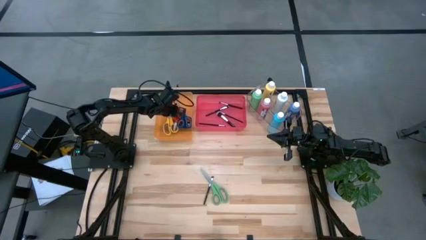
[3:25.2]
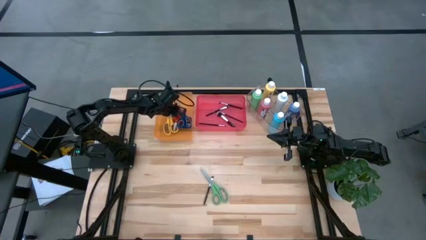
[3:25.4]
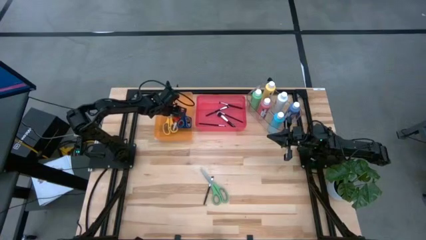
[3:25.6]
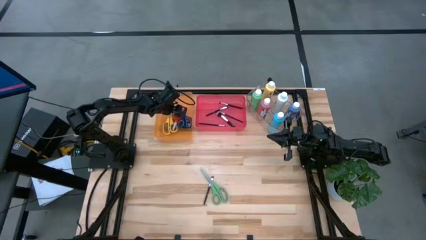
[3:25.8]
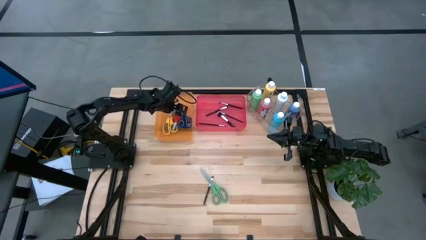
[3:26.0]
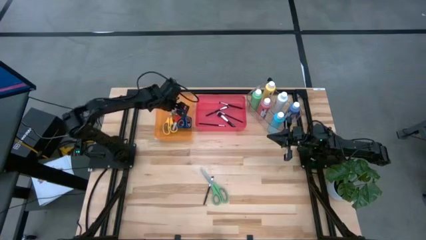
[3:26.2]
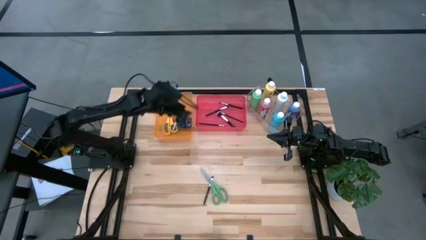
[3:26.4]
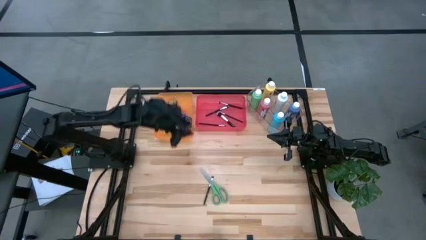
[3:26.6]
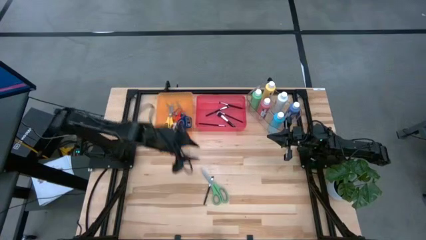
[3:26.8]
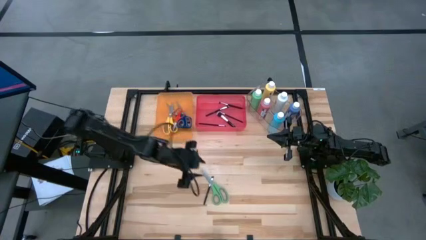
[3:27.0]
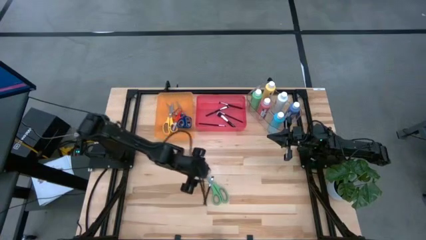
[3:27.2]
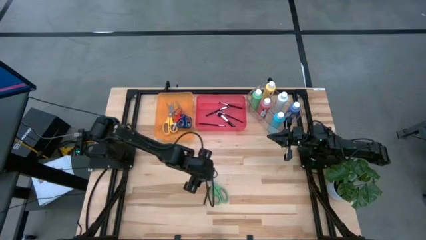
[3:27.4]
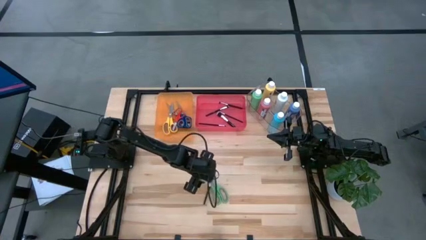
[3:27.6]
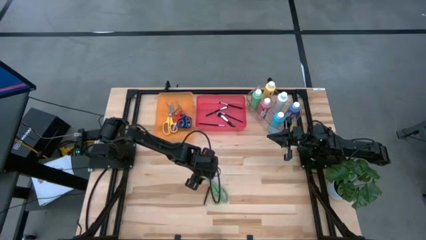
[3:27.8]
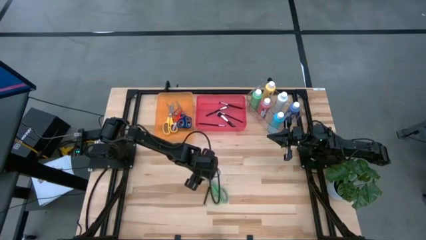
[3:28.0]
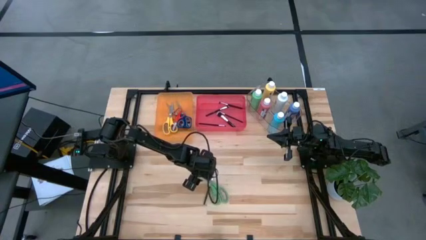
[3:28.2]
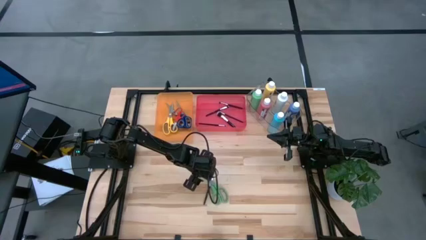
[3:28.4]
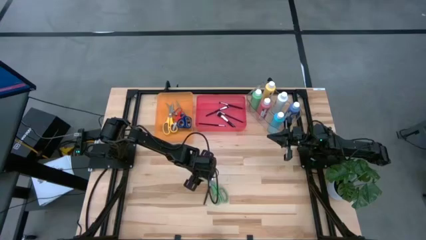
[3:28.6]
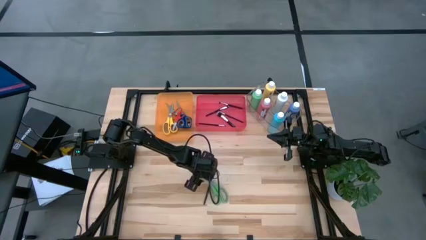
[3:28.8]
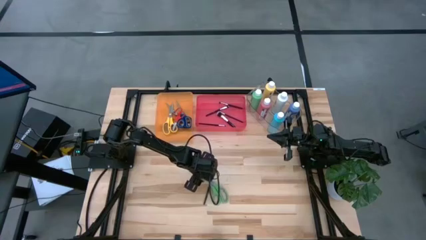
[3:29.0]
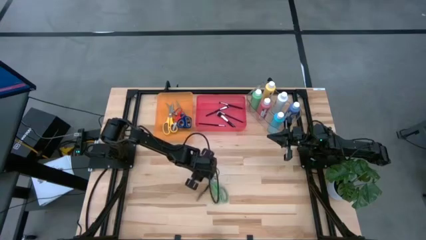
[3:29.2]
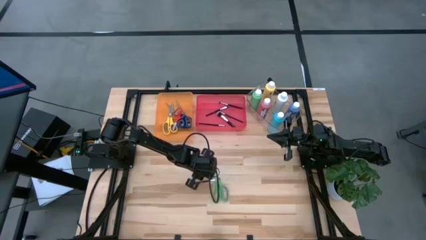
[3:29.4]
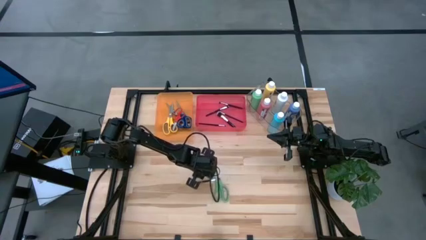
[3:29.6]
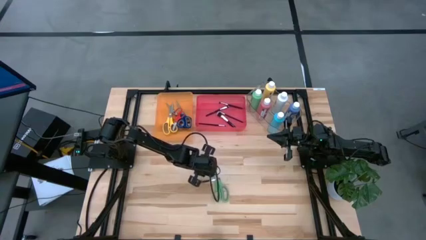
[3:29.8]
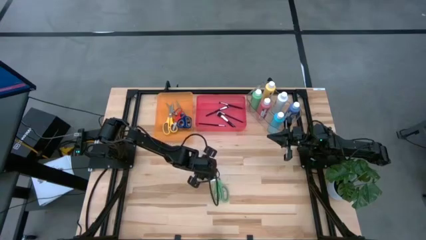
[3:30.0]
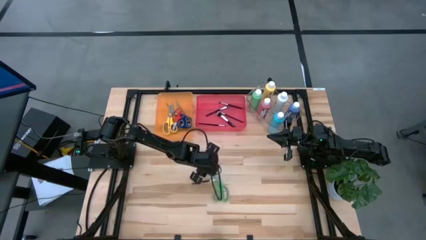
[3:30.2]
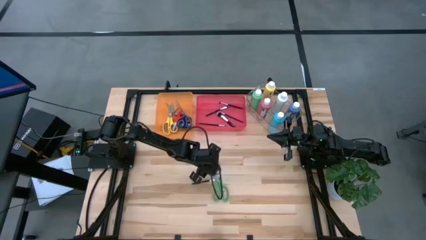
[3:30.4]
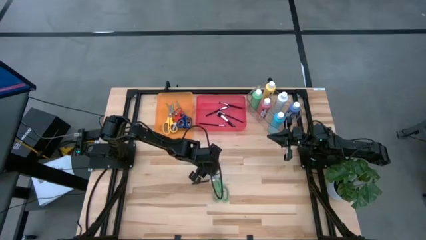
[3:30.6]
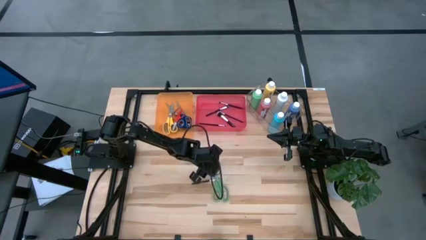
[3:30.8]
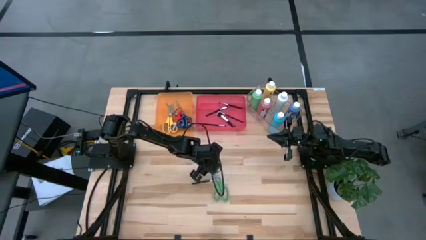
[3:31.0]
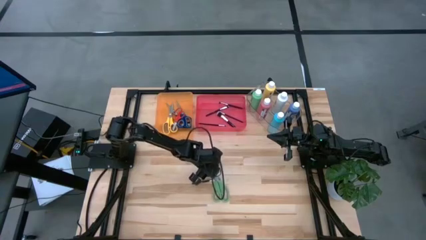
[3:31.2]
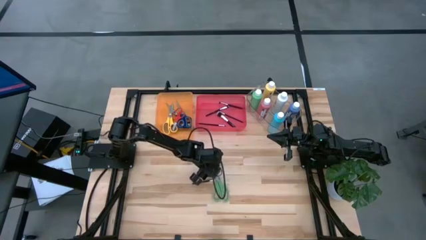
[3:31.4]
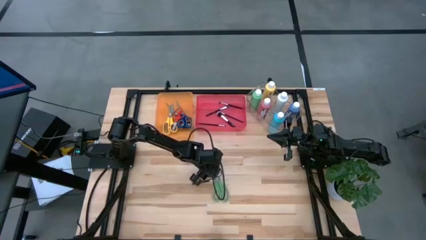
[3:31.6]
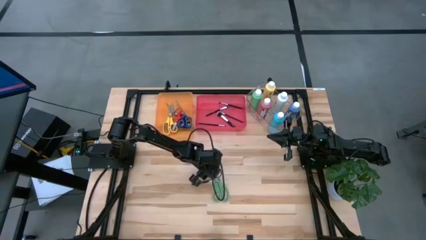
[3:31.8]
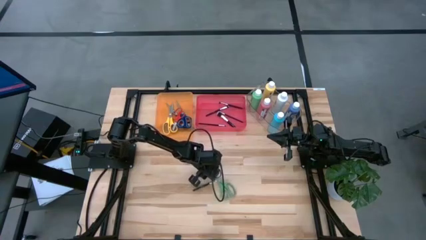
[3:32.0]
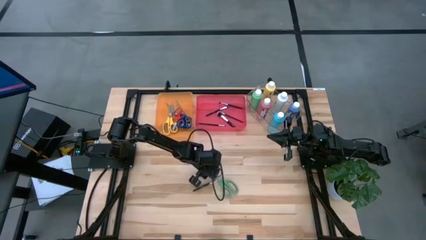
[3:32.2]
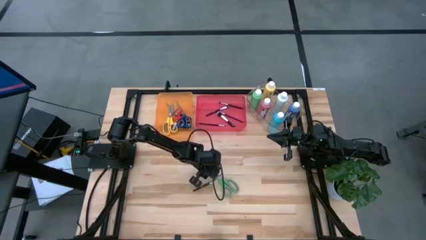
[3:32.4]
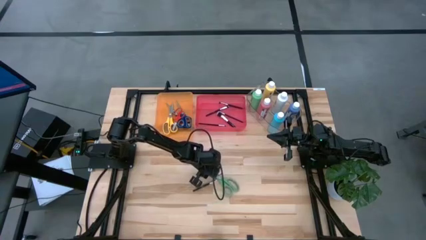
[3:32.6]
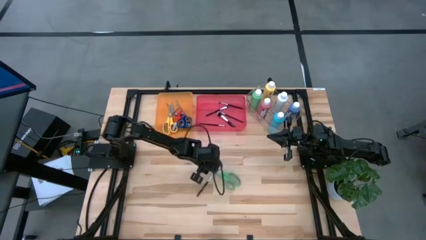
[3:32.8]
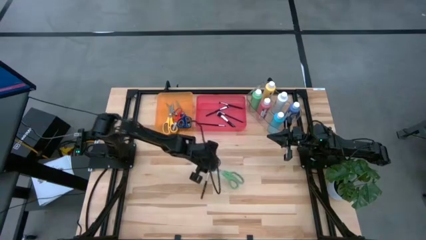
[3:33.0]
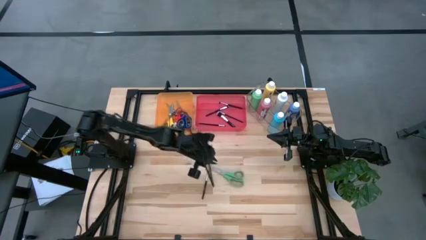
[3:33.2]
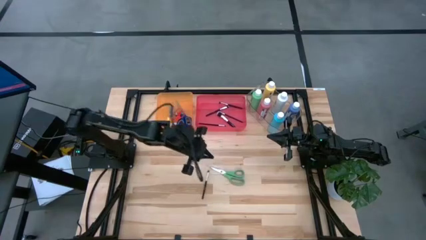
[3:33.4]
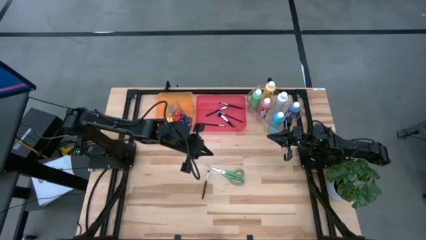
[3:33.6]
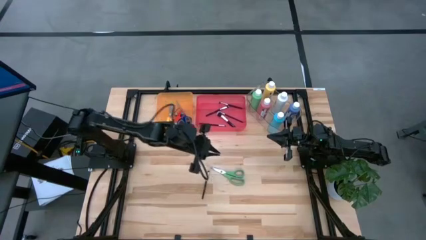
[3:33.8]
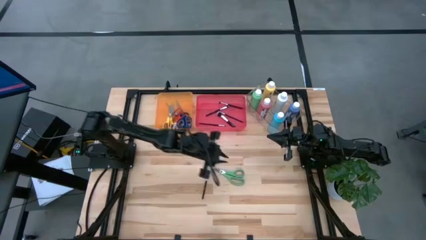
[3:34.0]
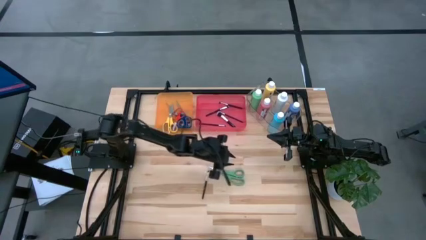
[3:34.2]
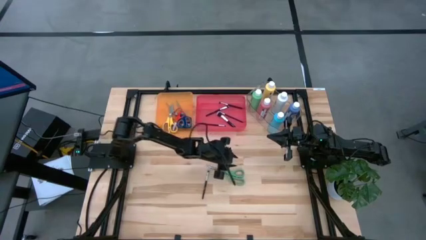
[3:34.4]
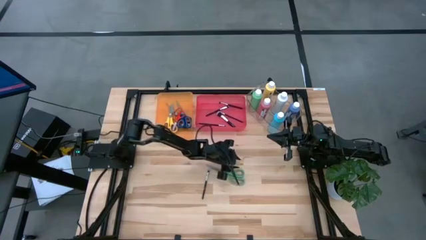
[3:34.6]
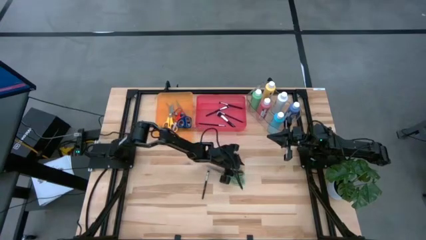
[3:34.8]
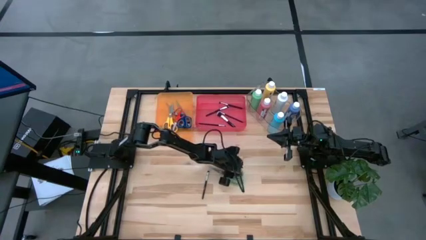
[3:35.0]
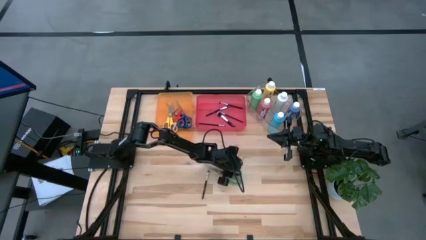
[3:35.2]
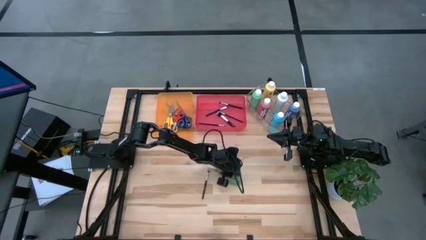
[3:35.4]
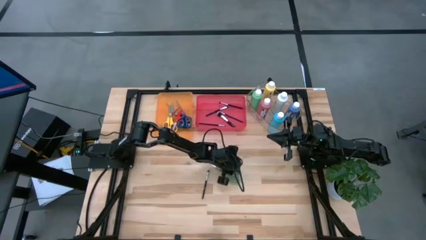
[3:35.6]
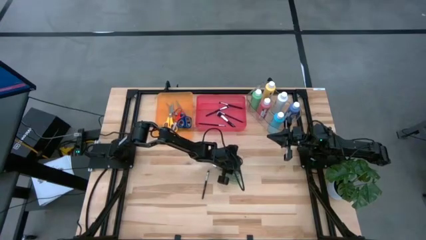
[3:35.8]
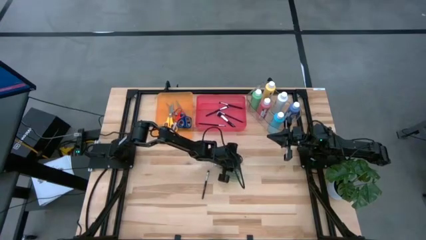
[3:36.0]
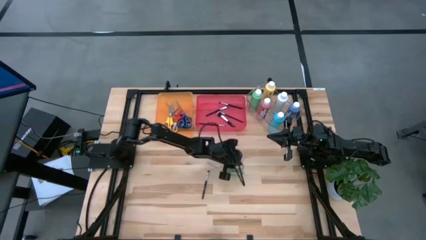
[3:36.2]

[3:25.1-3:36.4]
Task: Pick & Place Paint Supplies
Put the green scissors into the orange bin

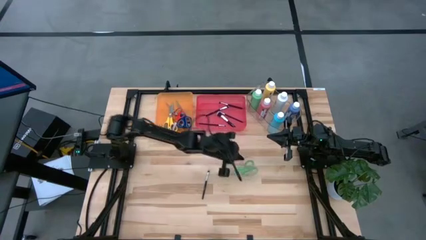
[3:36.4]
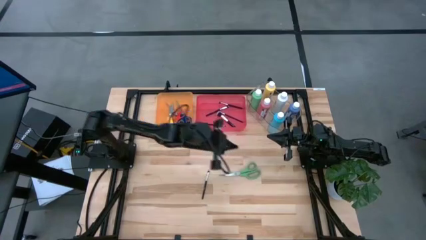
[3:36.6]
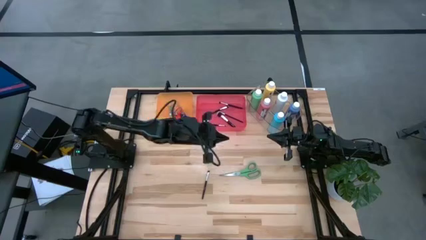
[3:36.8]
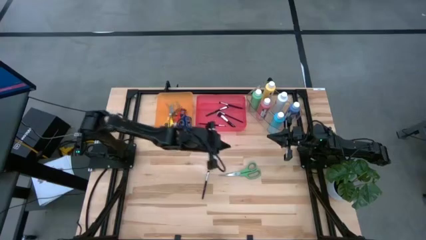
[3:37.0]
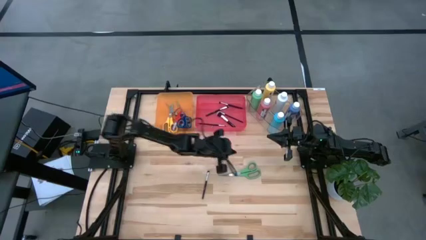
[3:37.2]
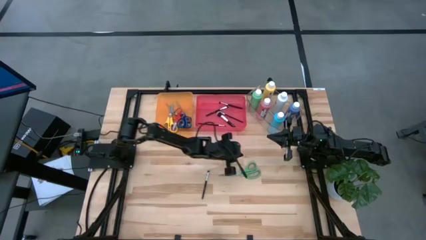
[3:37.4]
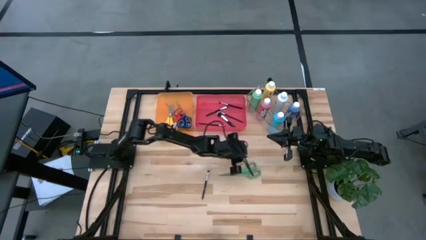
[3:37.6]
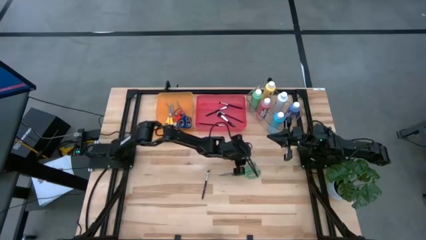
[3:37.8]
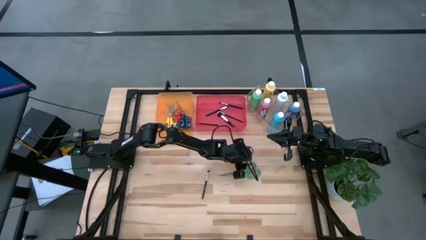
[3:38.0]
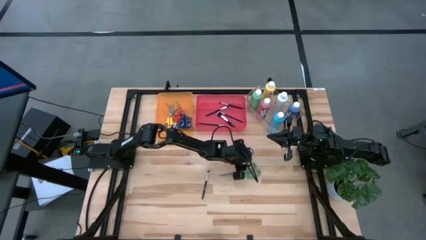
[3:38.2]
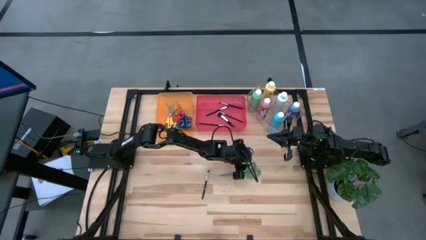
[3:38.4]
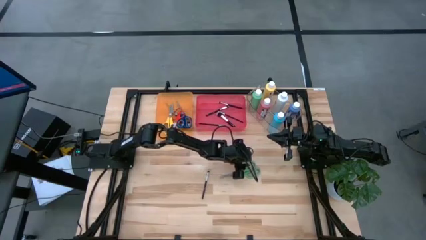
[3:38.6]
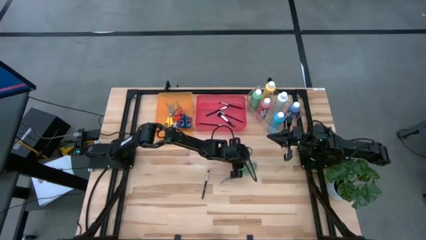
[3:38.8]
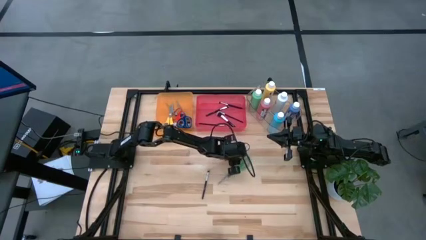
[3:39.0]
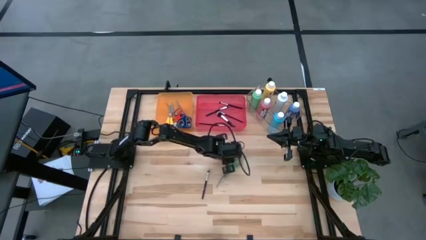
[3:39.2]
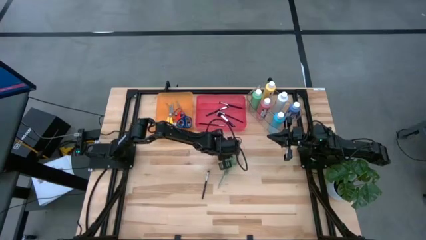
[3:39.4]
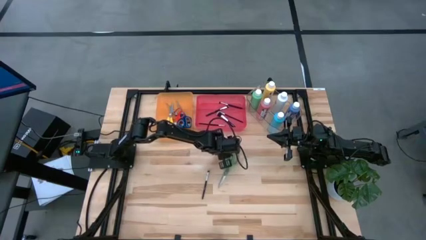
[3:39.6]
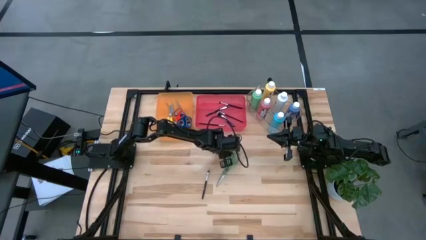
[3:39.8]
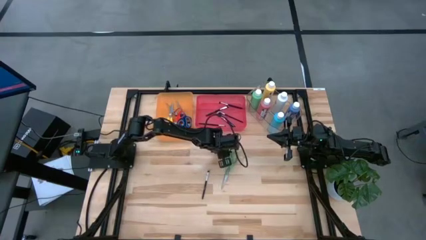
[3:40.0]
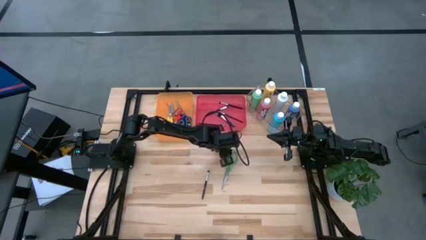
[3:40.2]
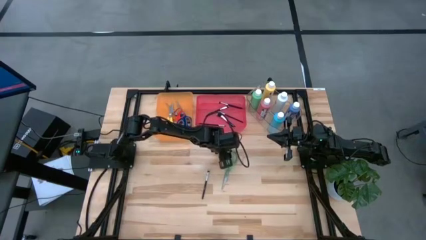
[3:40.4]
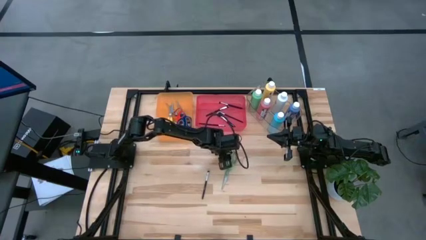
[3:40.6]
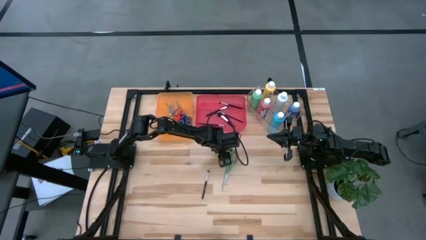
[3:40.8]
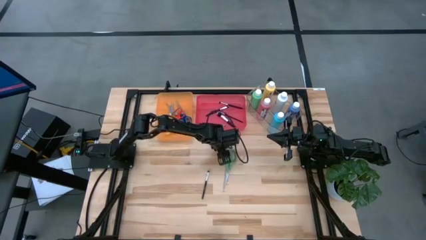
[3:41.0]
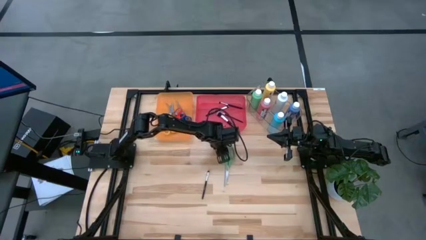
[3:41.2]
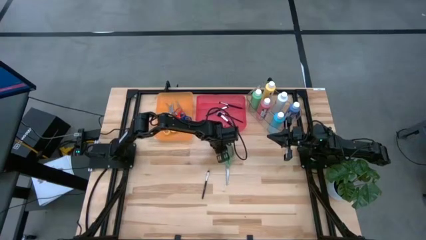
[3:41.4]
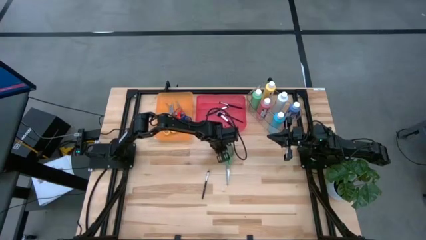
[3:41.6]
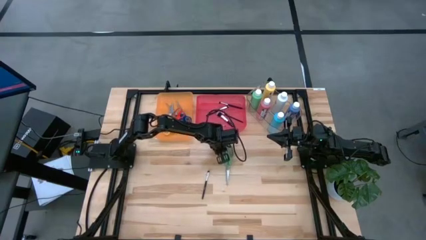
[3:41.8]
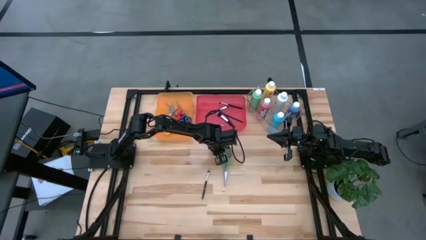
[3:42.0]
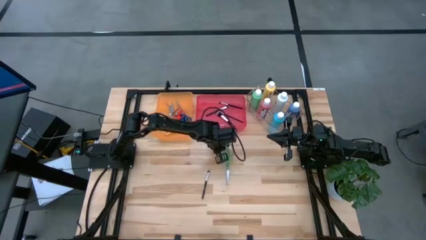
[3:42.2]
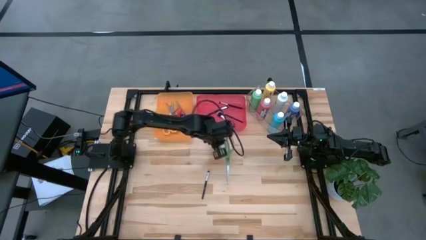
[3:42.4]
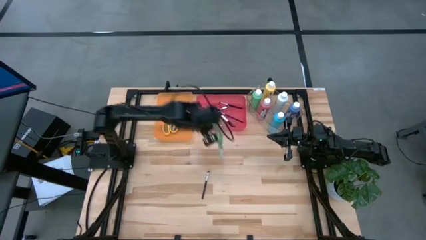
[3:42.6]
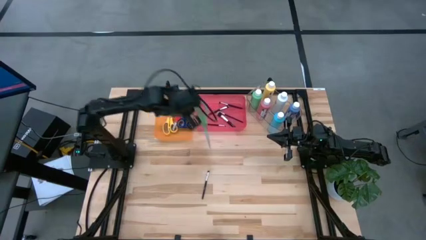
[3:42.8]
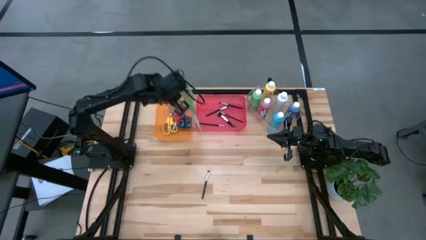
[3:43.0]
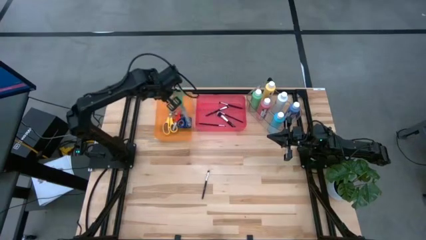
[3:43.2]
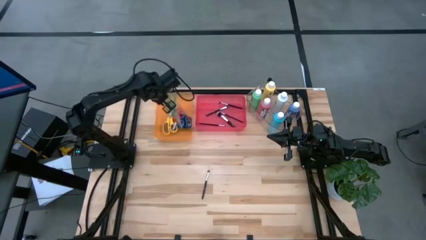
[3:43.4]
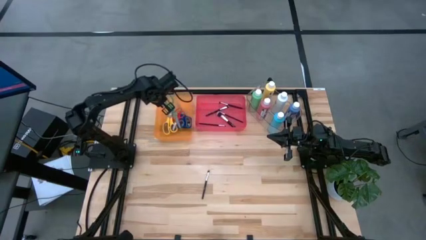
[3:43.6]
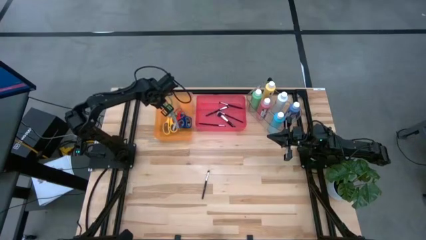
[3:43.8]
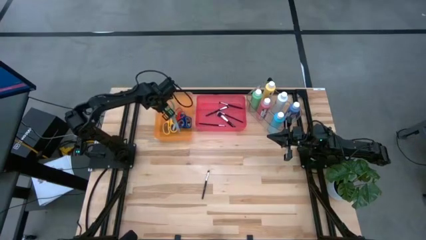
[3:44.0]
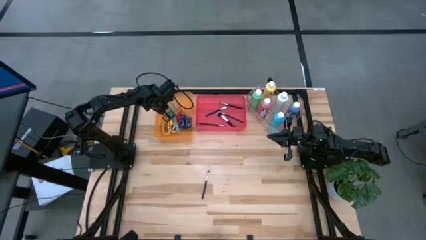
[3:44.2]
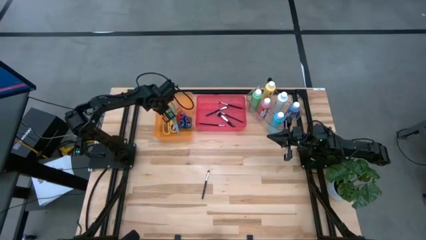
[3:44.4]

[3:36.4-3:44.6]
Put the green scissors into the orange bin
